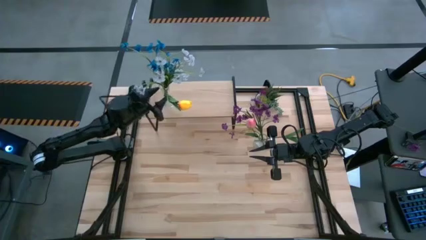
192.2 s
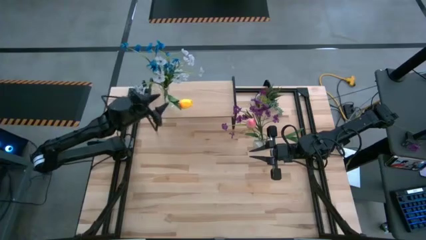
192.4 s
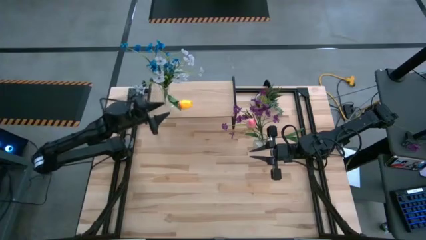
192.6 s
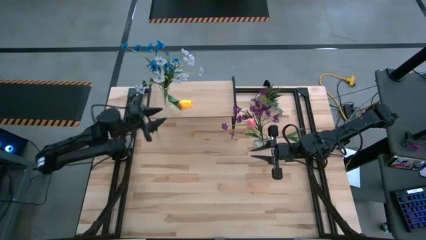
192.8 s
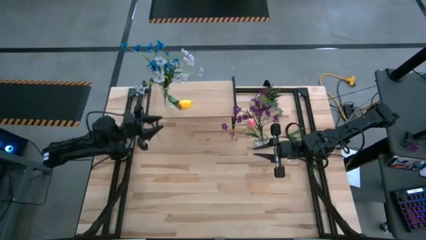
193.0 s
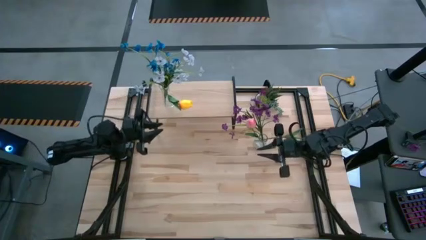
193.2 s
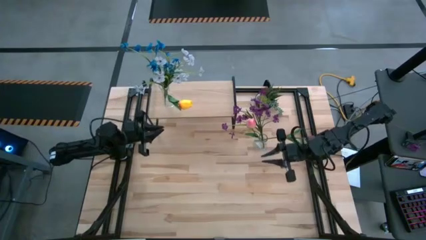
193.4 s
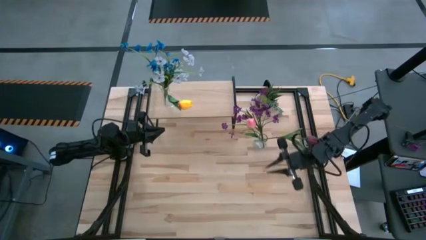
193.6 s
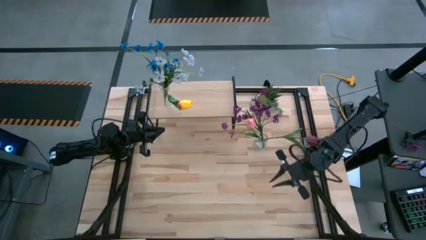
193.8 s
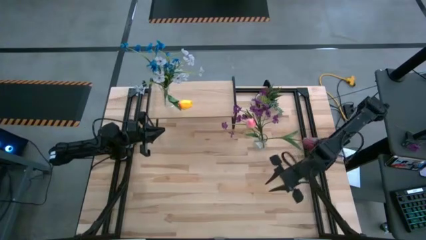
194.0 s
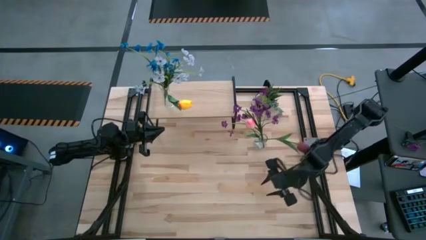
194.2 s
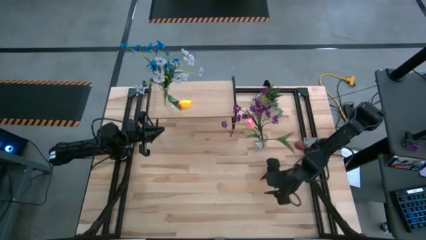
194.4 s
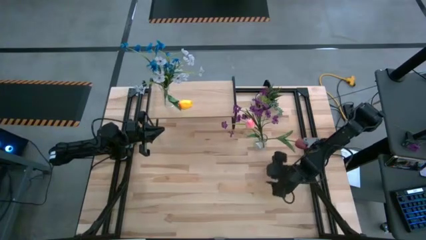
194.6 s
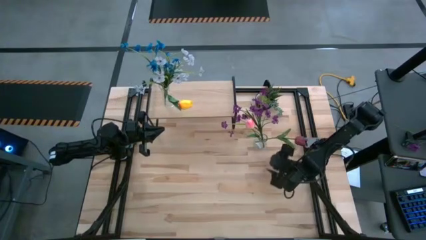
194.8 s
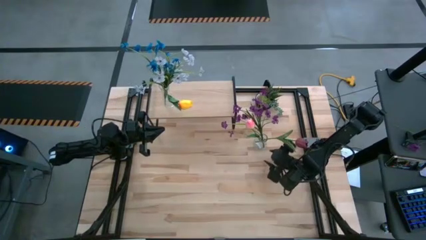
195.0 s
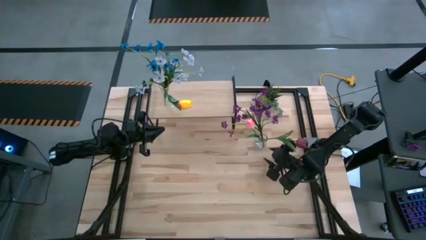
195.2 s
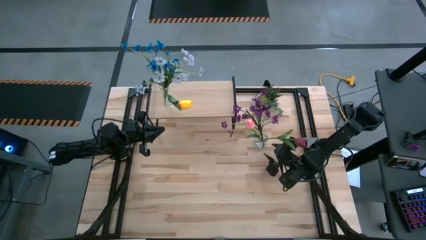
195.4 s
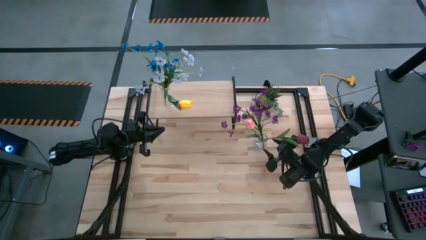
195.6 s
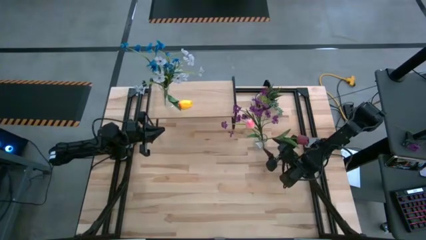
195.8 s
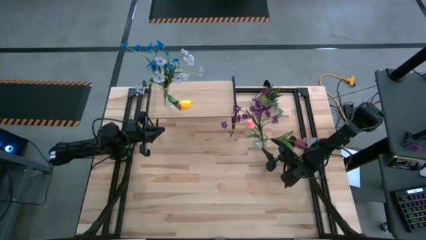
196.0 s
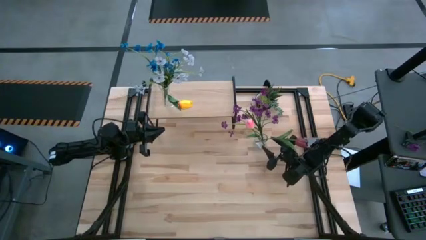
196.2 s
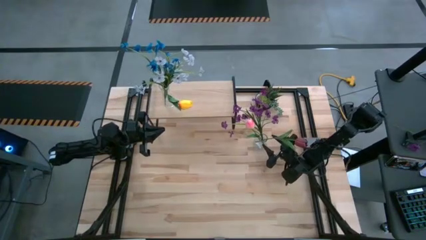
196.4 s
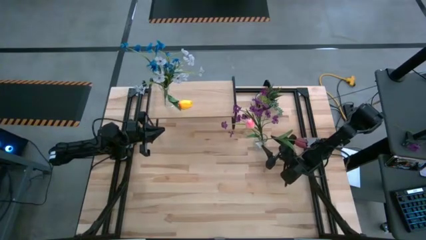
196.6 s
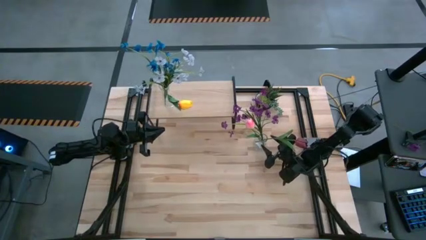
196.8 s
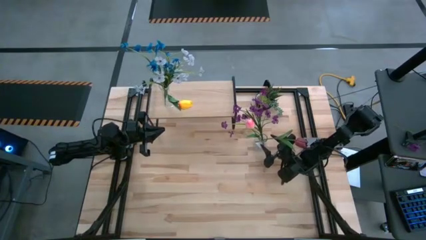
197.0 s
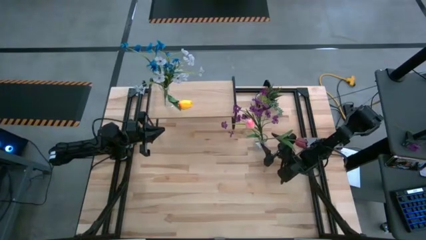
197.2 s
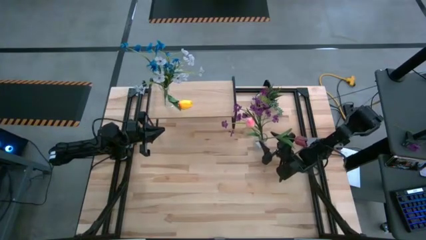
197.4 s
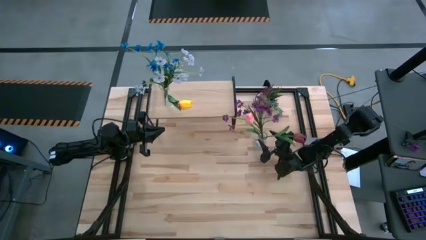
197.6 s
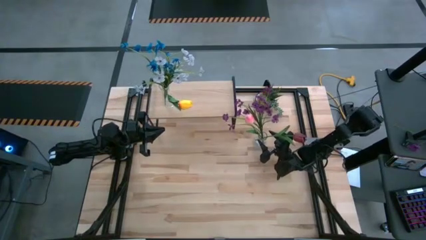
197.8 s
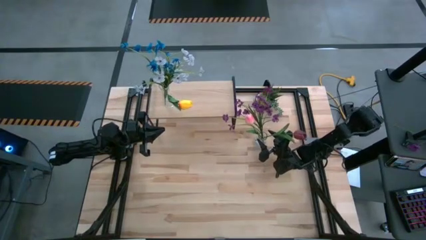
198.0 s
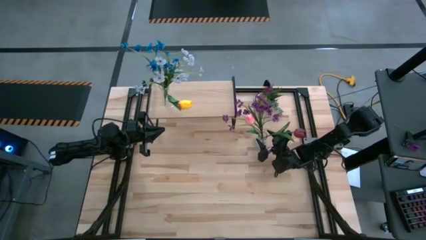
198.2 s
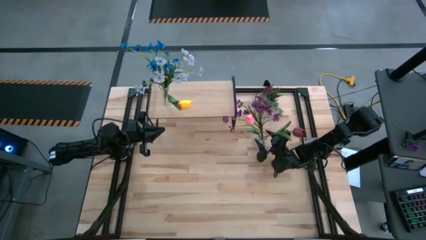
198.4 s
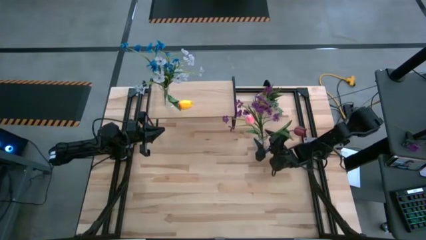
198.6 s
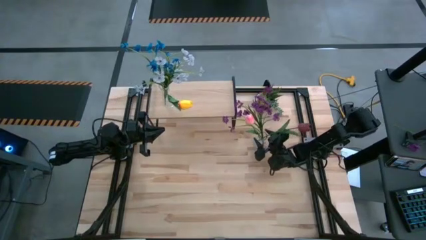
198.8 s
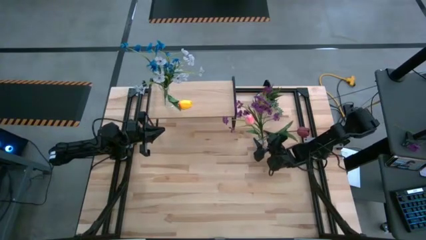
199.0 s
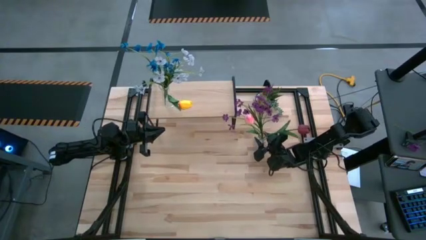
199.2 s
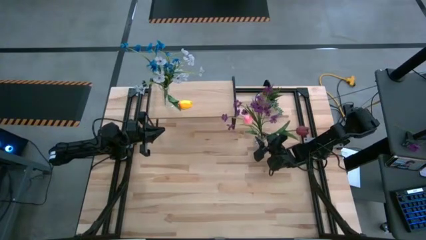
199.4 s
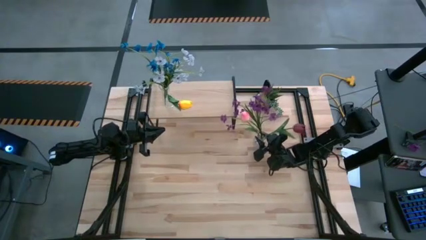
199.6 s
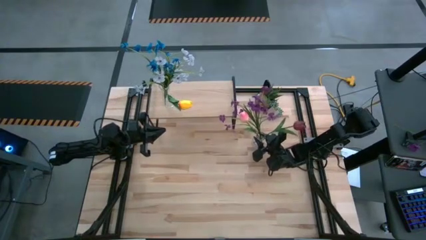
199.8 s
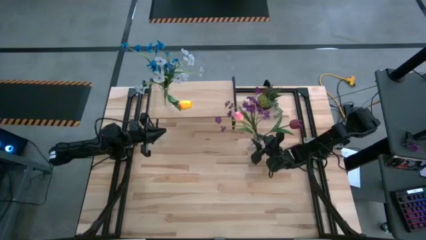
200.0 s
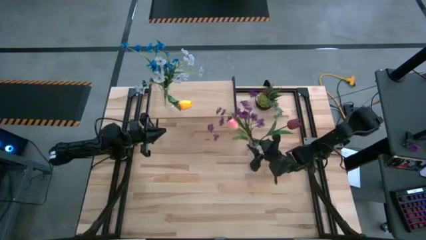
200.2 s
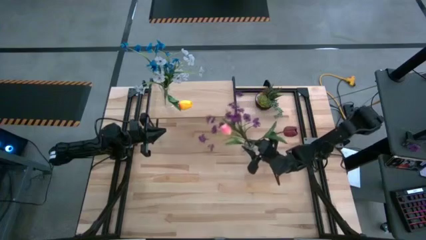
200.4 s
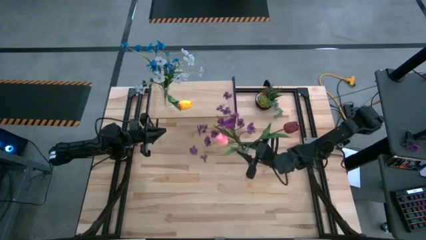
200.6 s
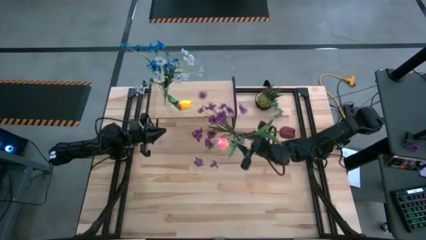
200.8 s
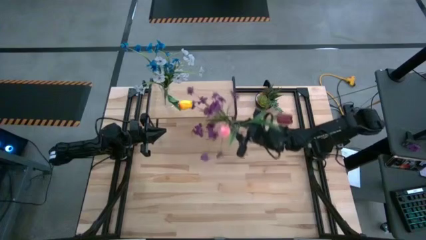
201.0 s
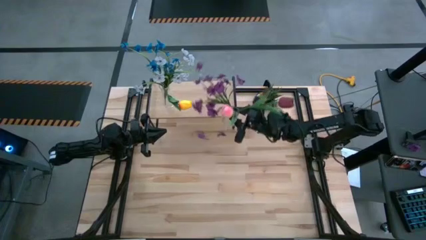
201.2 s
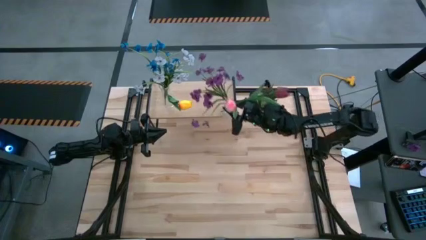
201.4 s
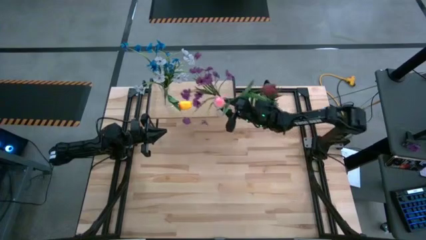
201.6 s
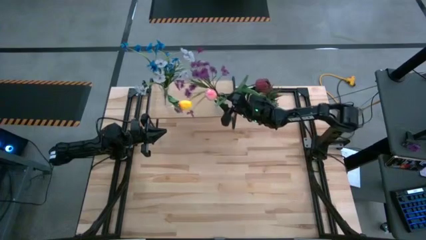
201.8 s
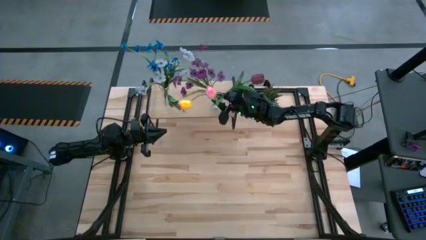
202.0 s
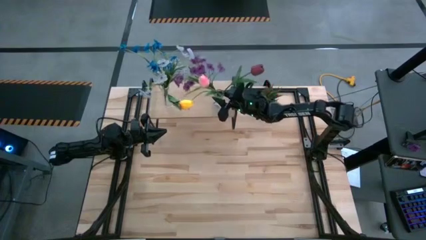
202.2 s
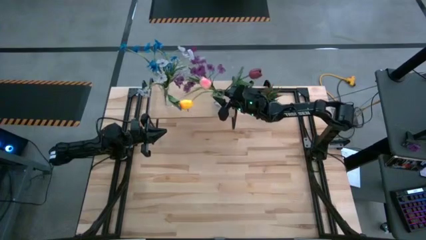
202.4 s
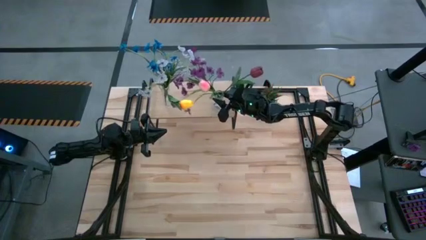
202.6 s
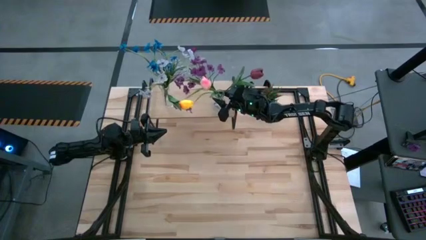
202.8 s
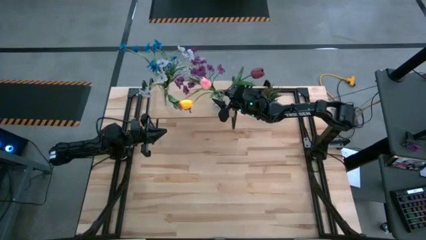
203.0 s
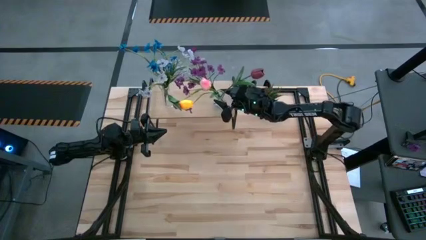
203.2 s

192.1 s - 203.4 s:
Task: Pick and place flowers into a vace then onto a shelf
Put the transparent vase on the shelf

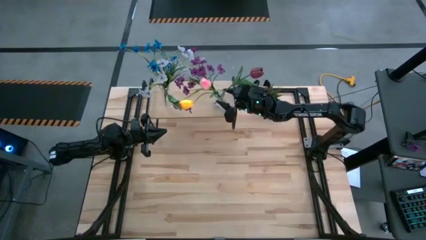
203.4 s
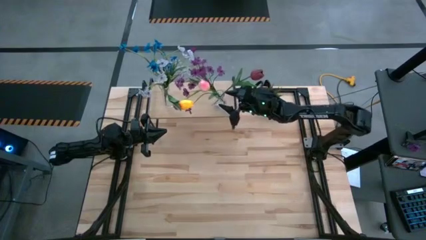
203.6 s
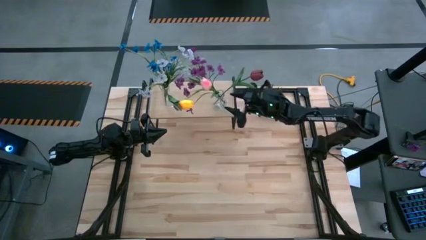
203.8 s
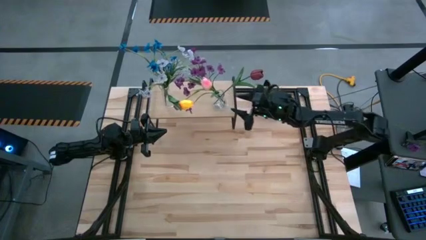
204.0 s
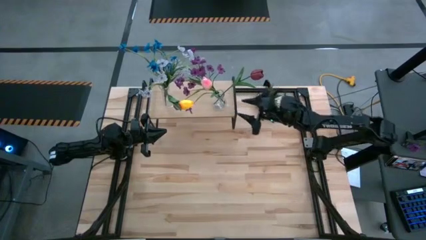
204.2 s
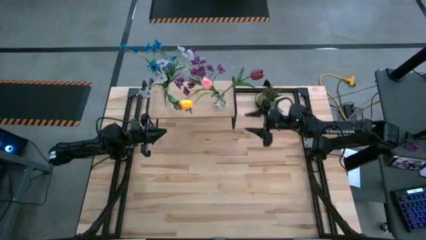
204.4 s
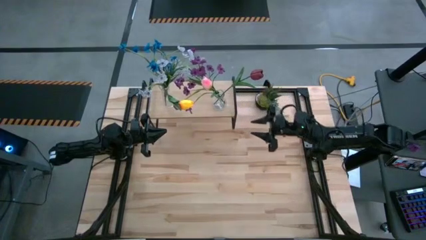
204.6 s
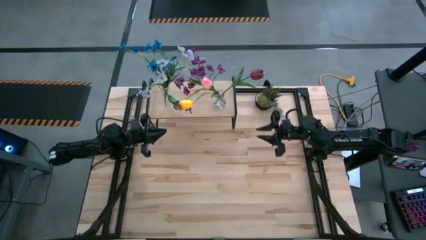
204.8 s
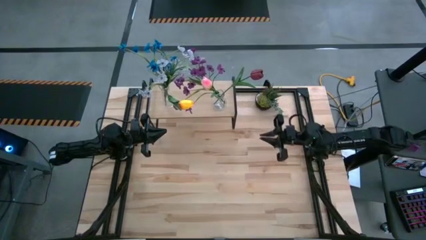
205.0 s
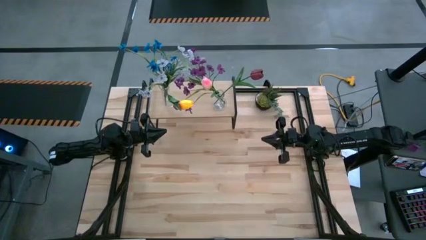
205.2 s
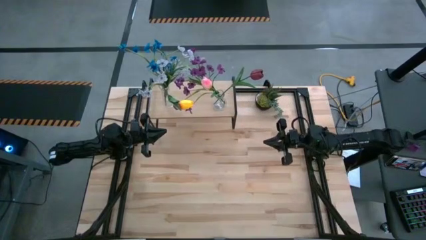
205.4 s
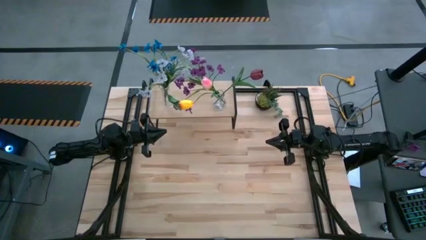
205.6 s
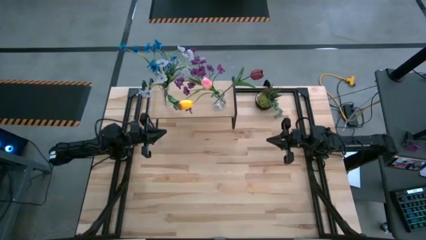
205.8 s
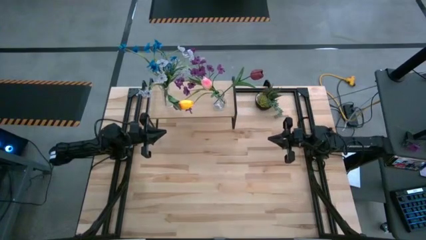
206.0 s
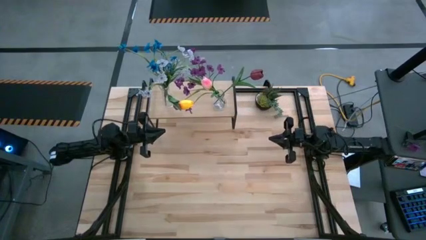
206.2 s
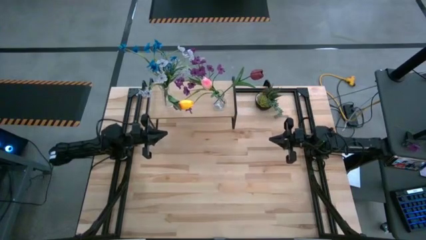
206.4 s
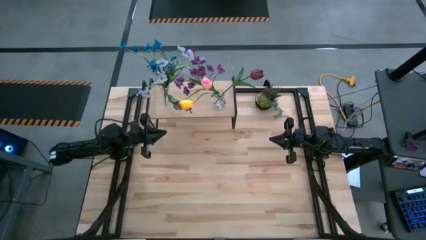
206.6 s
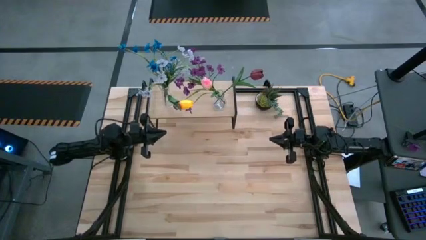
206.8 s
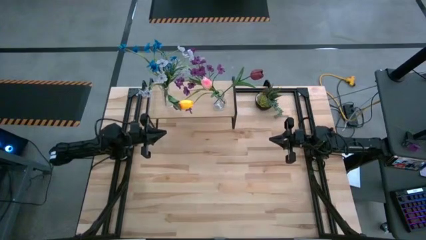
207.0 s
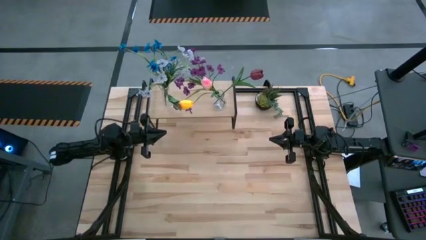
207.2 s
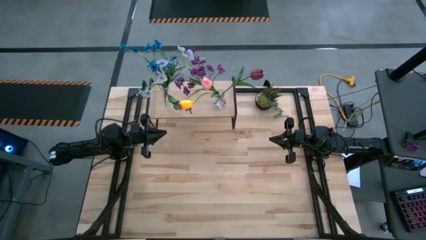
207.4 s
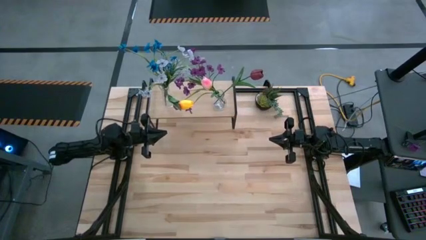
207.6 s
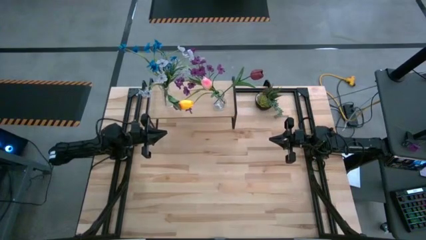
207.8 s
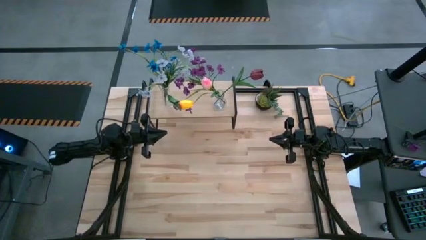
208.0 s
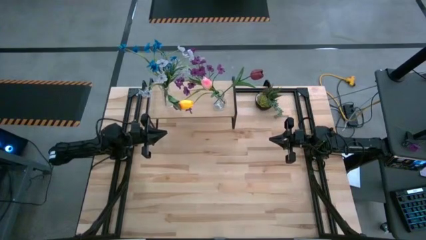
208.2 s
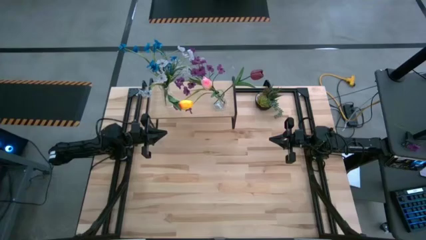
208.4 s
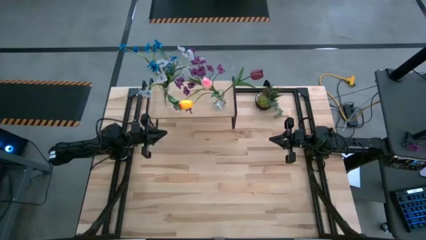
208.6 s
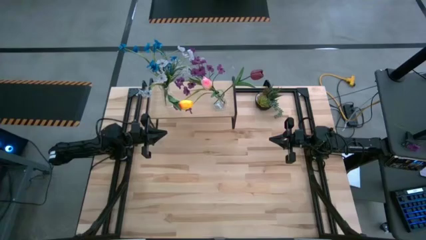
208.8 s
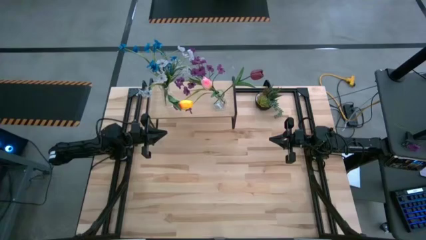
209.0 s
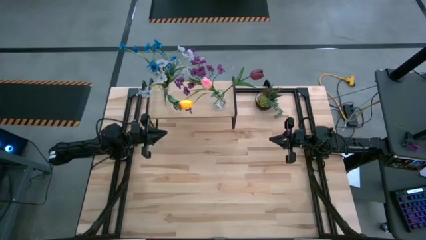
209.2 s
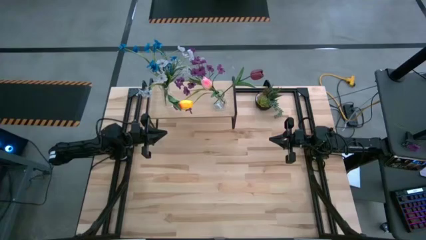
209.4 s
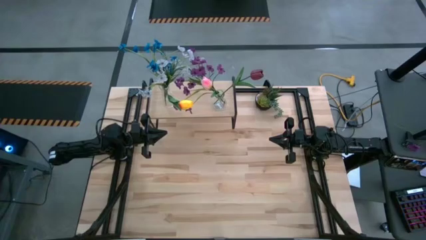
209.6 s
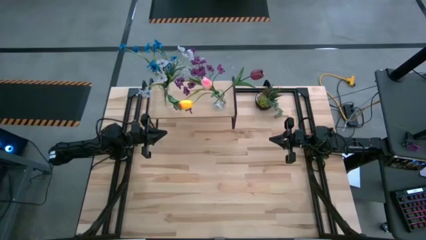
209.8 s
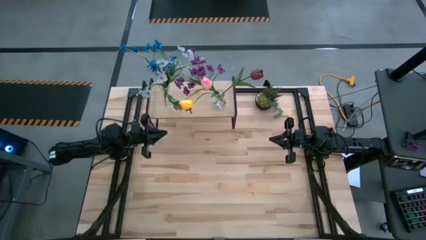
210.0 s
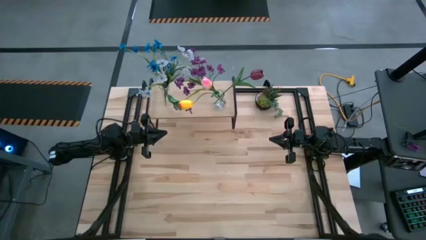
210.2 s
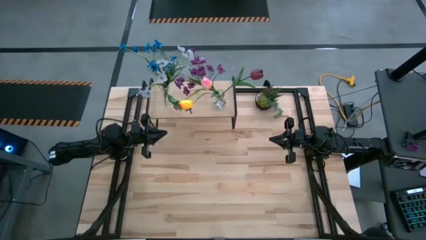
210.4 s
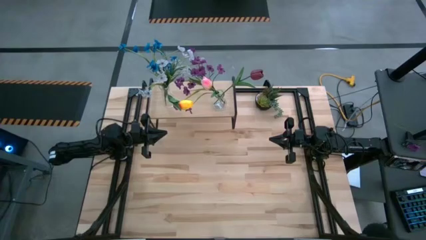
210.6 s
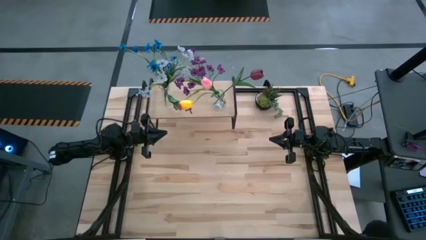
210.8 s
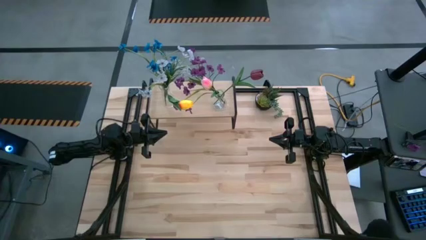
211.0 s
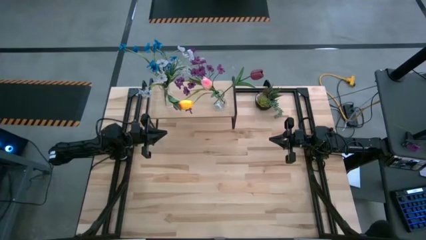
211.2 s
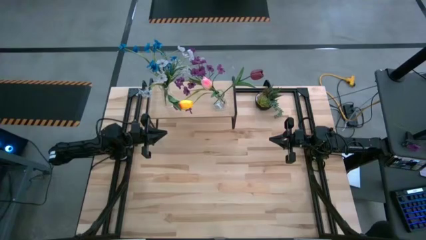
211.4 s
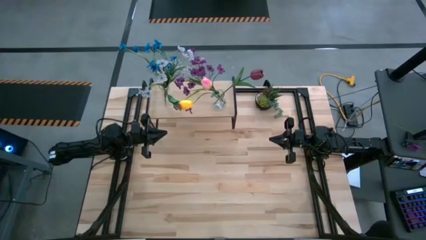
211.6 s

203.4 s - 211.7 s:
Return to Home Position
